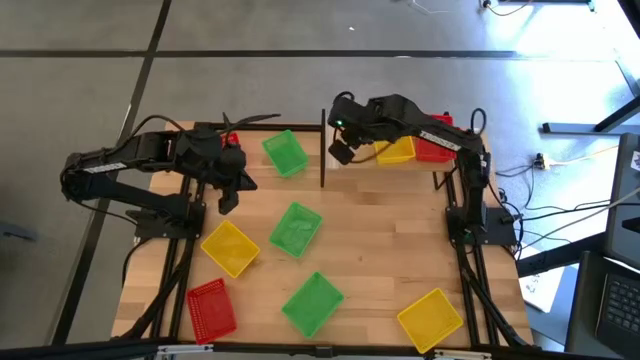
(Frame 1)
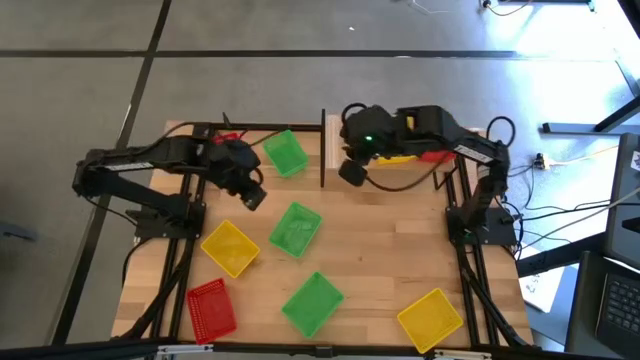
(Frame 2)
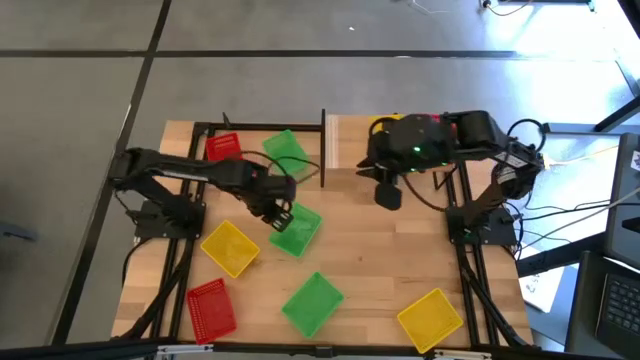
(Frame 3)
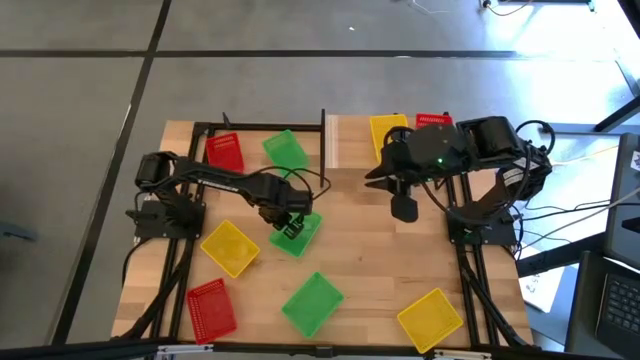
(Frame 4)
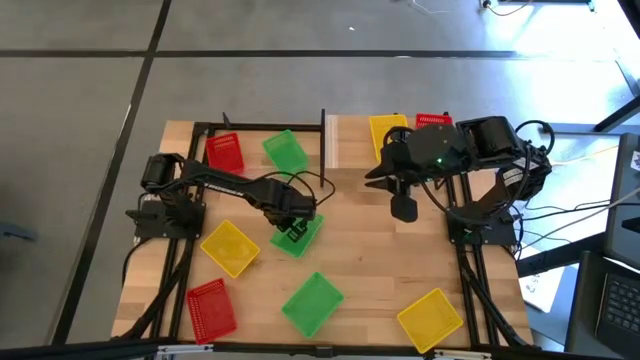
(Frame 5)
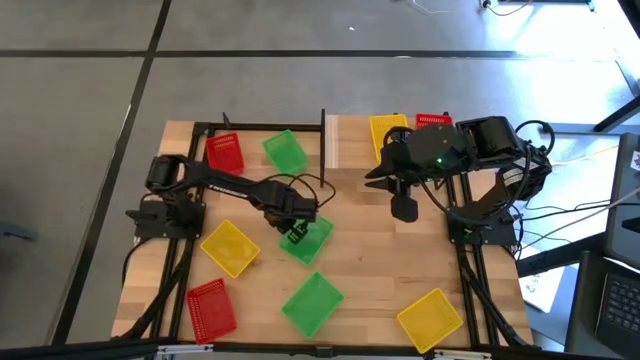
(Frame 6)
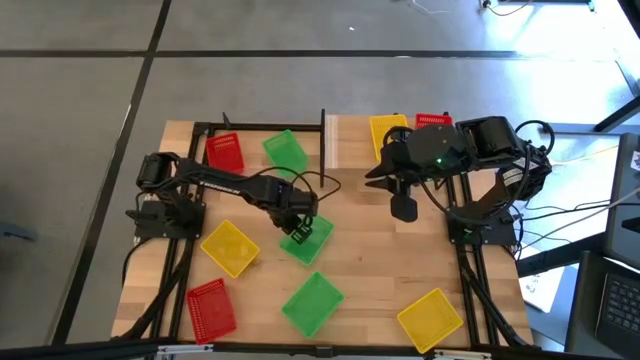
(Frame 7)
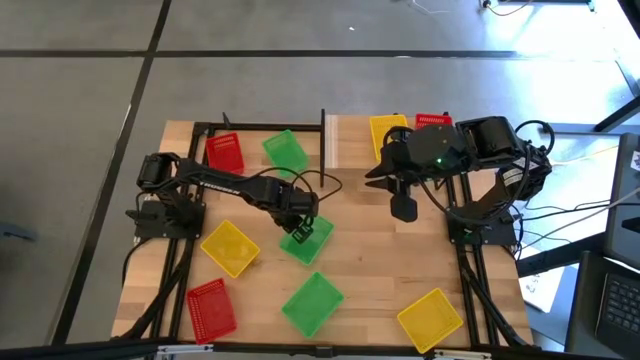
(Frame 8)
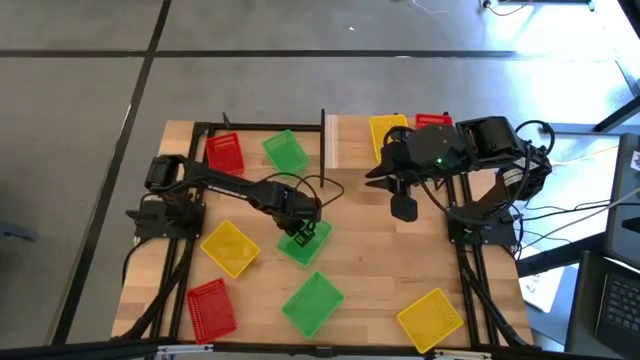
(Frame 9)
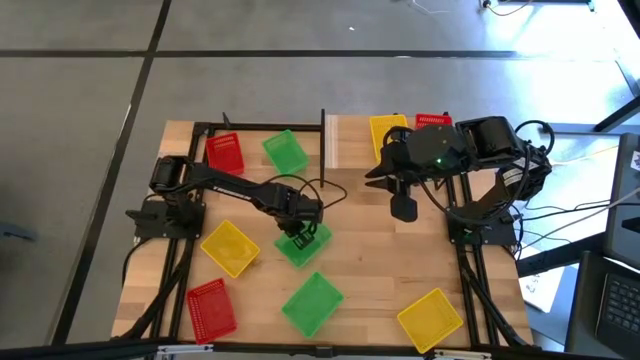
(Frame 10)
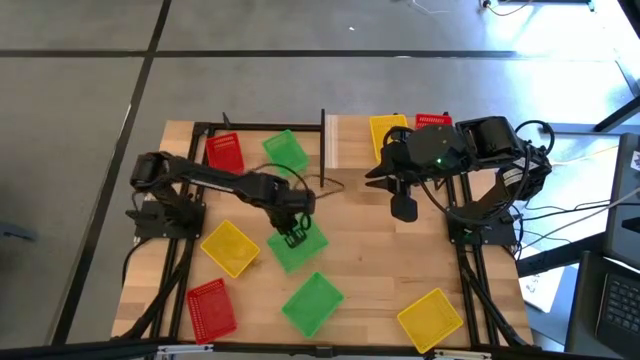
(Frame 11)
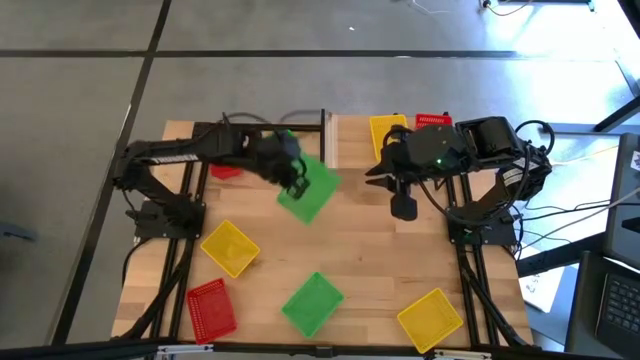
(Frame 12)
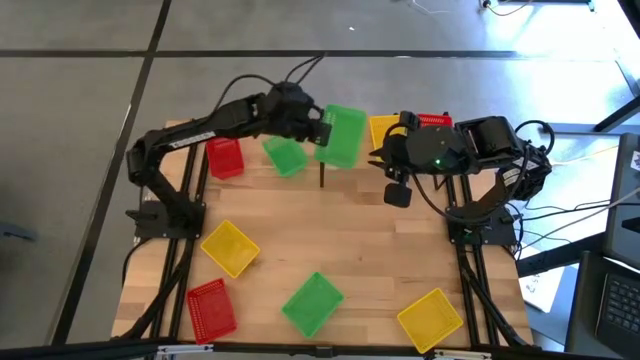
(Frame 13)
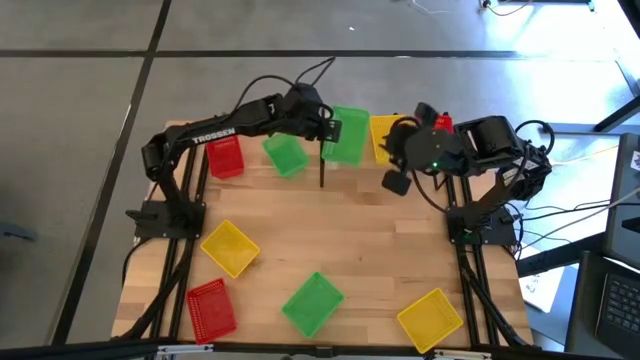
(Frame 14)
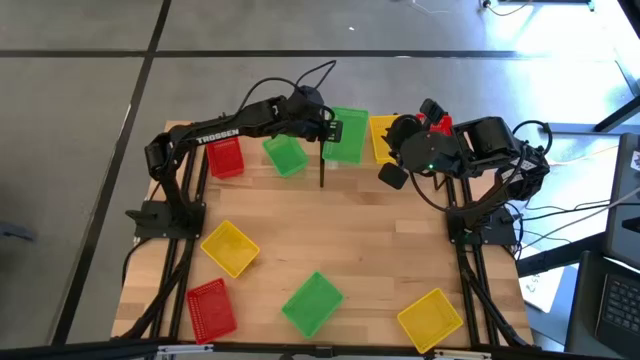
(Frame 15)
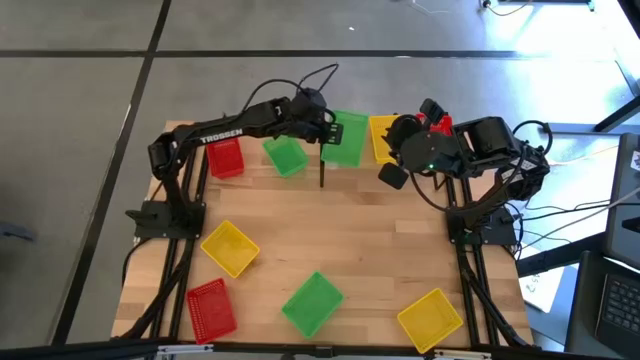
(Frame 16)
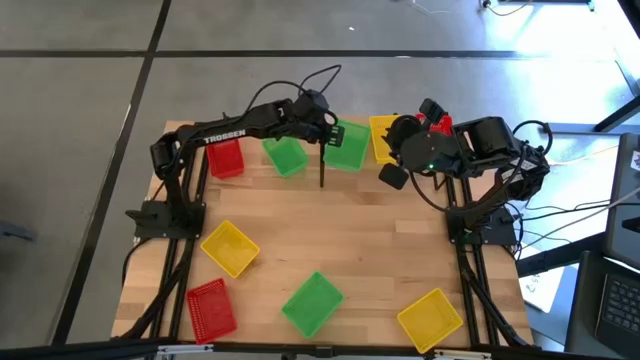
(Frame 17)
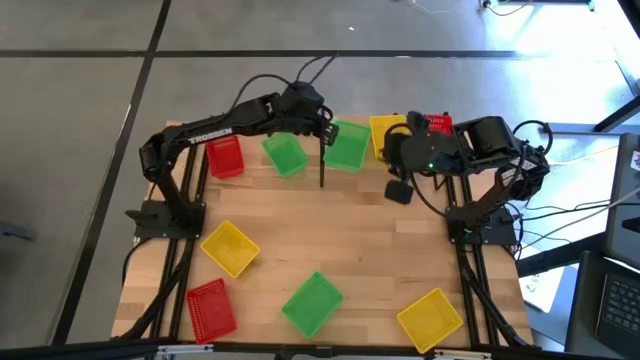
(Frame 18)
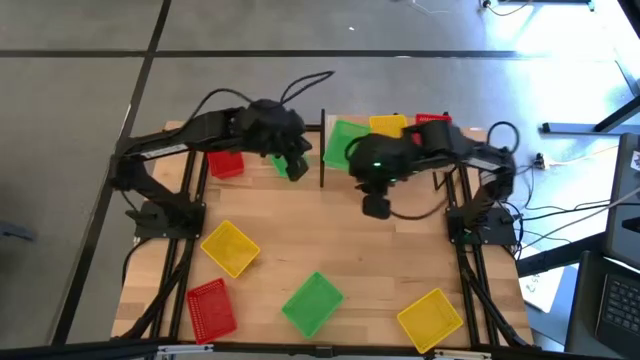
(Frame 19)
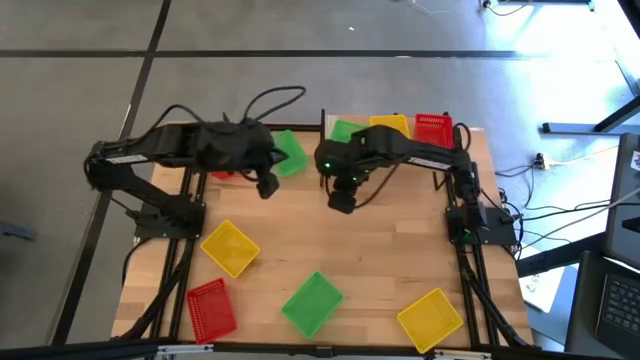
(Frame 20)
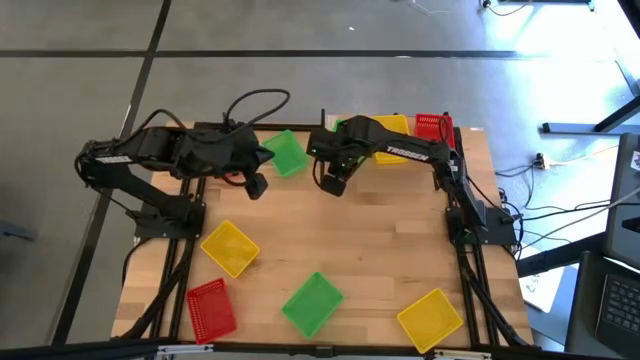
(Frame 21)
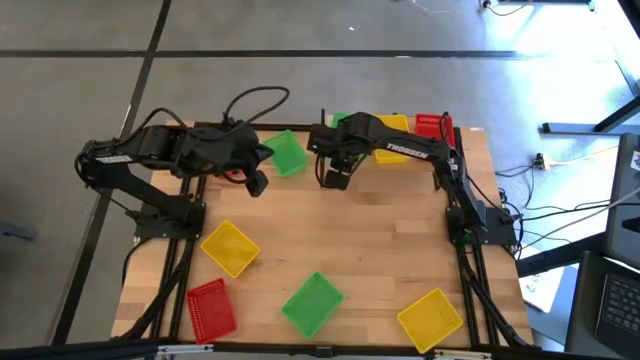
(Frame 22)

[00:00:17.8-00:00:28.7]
Task: Stack baskets on shelf by color
Put the middle green bin on the shelf

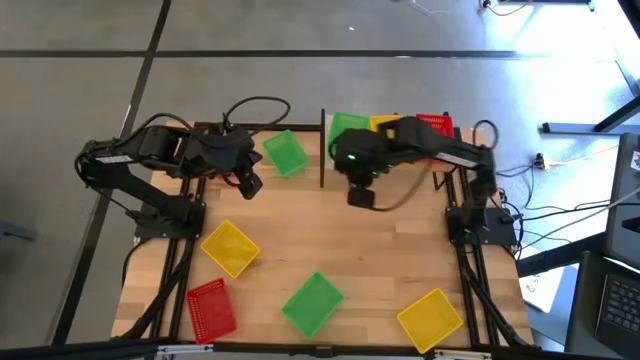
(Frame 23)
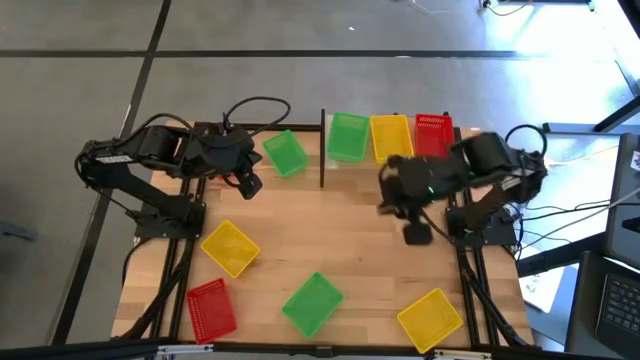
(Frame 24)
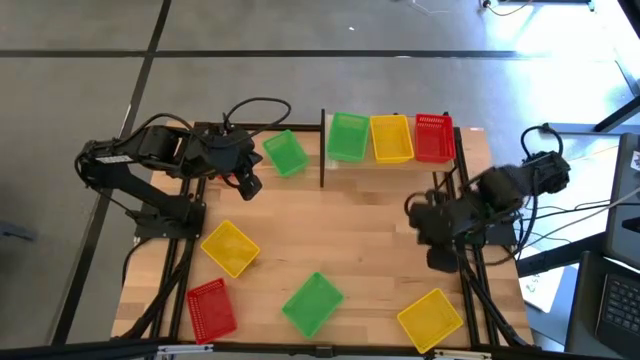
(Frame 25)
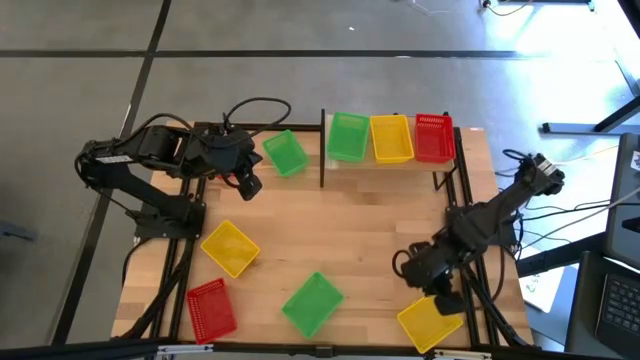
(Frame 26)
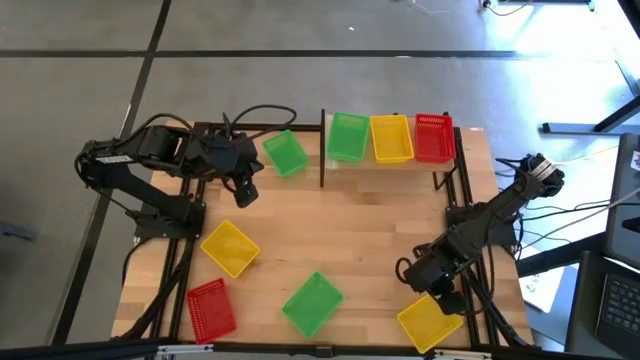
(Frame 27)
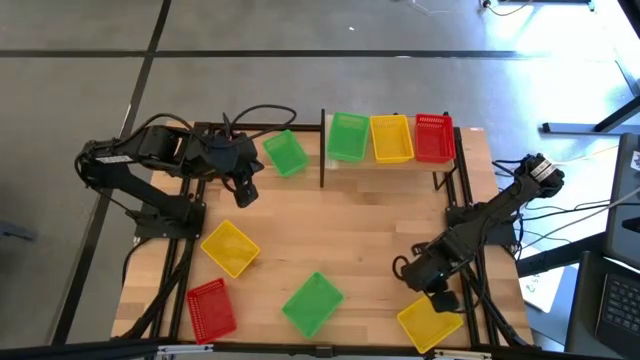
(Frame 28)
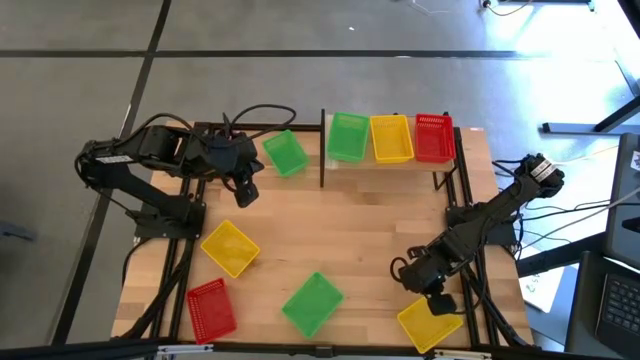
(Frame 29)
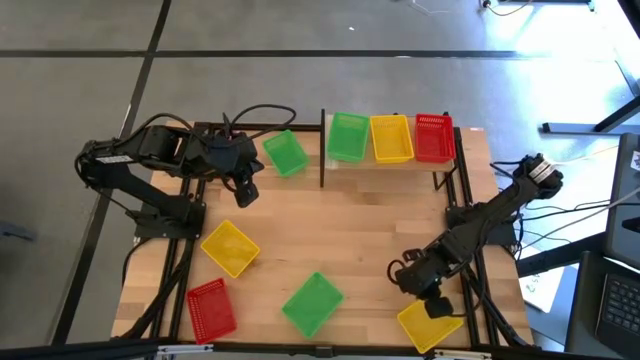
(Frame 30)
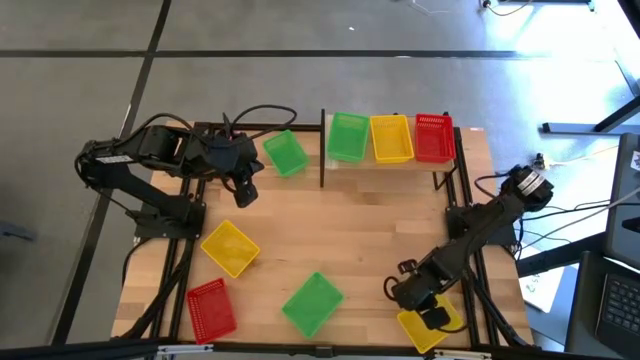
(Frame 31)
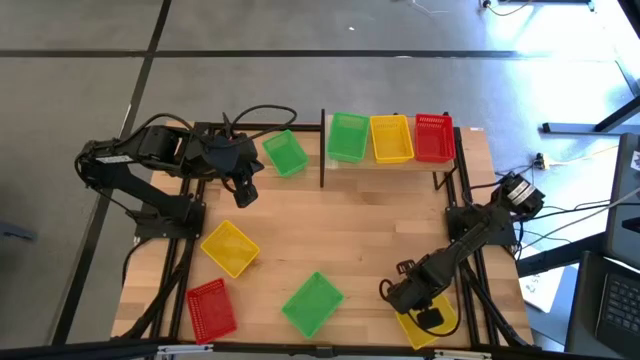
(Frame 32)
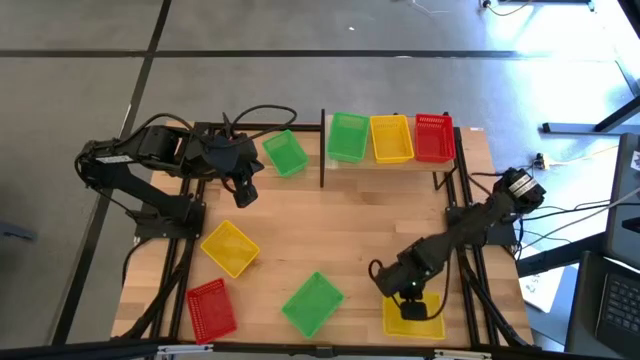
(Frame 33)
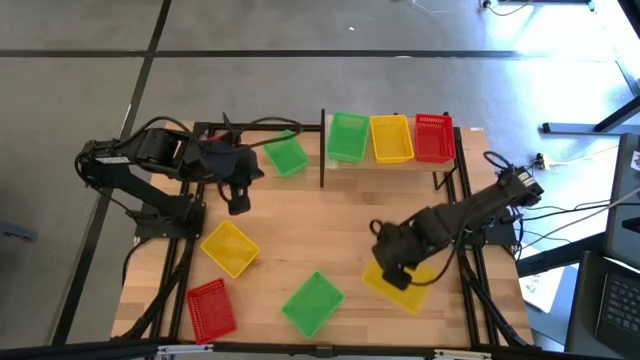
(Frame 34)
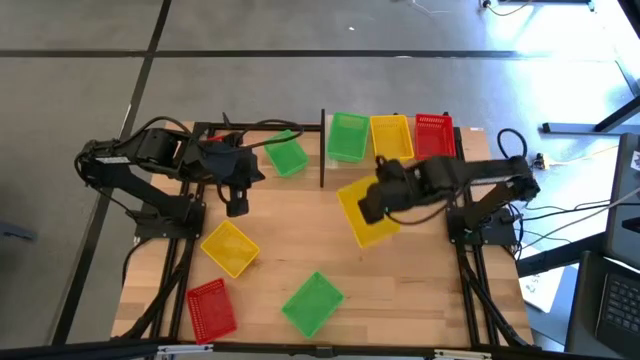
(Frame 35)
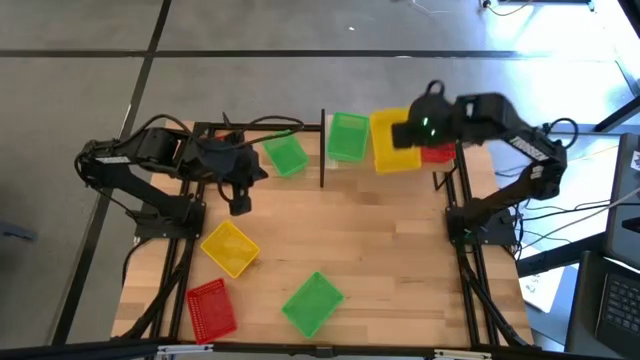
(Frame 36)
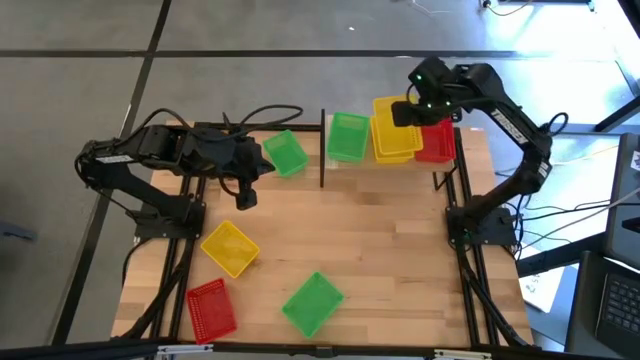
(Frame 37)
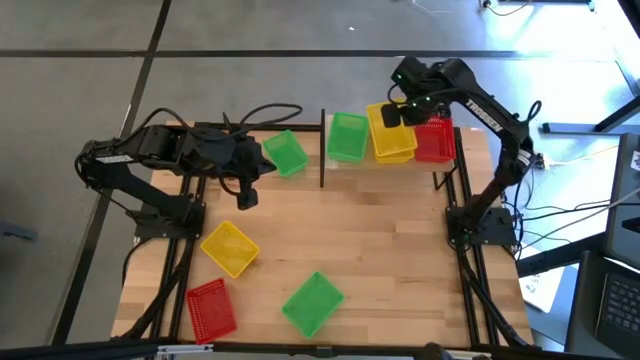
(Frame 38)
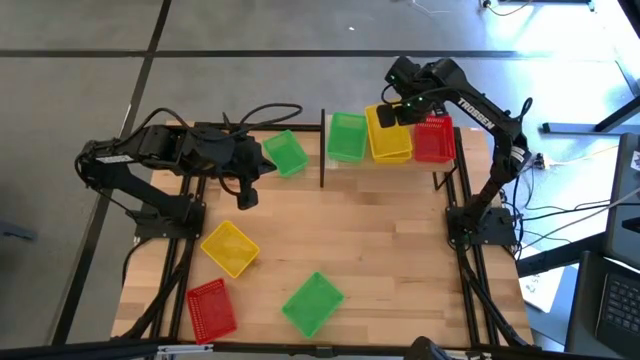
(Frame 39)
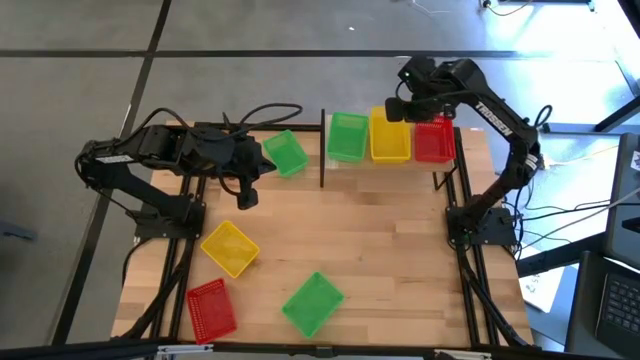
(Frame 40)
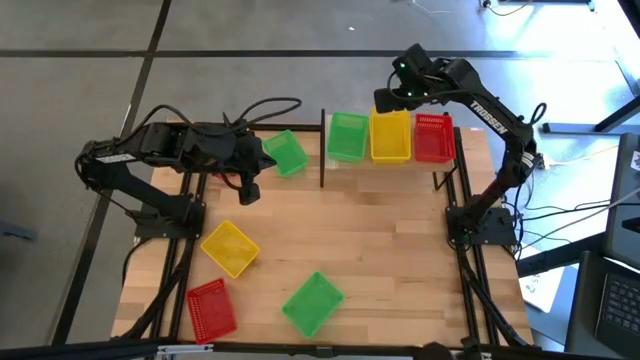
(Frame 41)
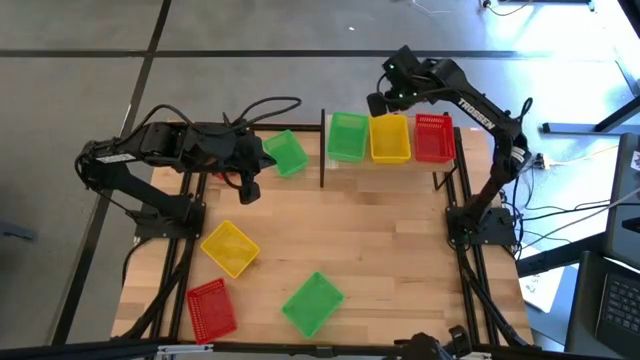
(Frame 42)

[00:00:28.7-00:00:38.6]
Stack the right yellow bin on the yellow bin on the shelf

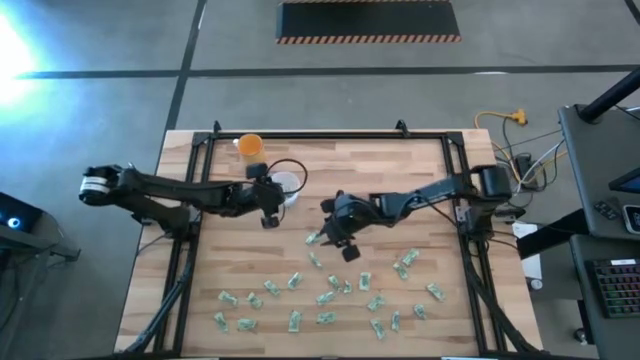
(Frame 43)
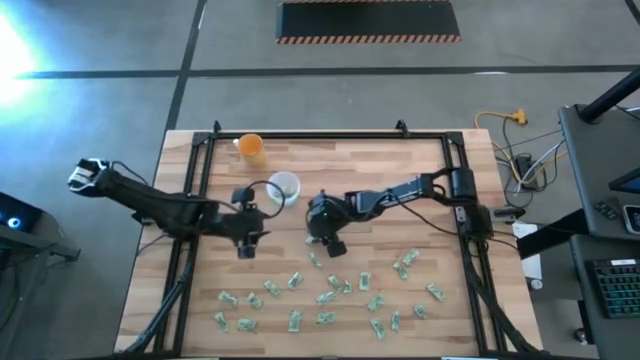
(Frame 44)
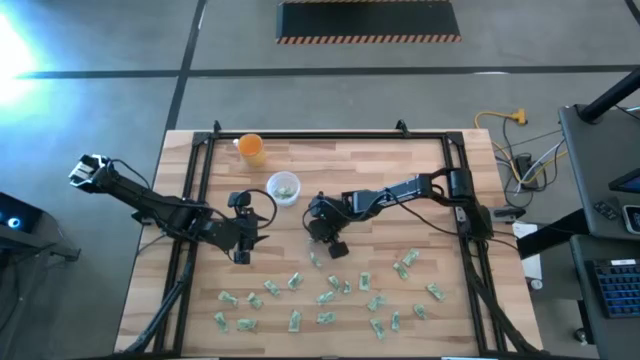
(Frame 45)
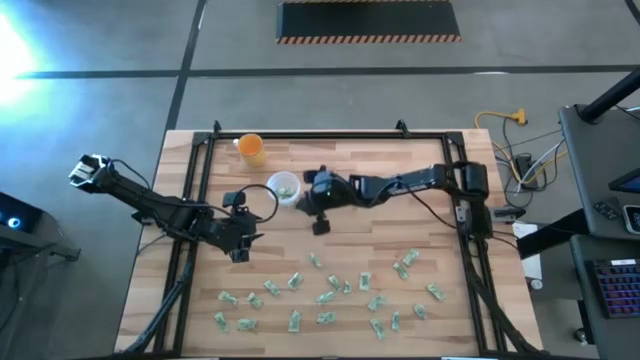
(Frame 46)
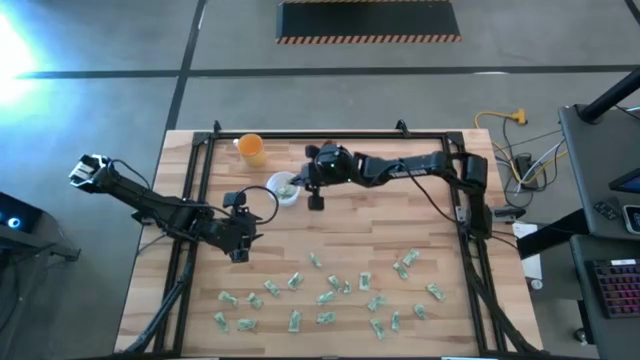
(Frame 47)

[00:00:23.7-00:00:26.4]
Task: Pick and place Stevia / Truvia into bins
Put the stevia packet into the transparent container
